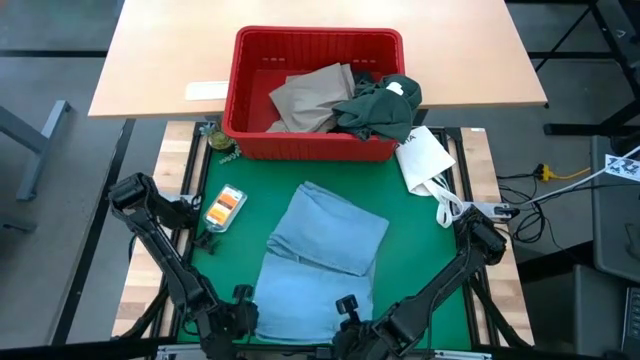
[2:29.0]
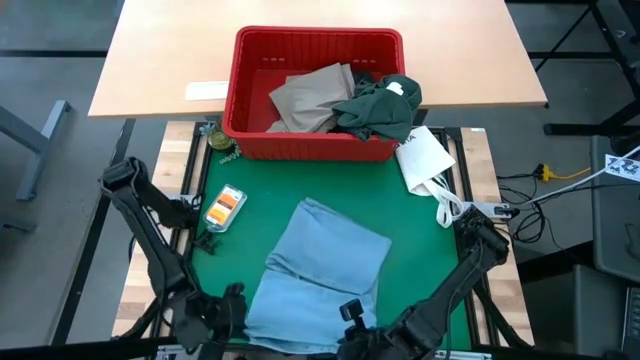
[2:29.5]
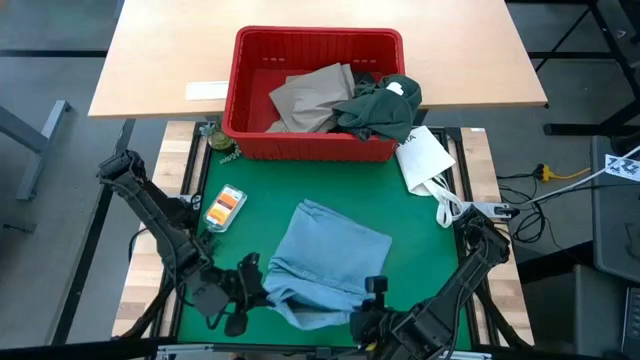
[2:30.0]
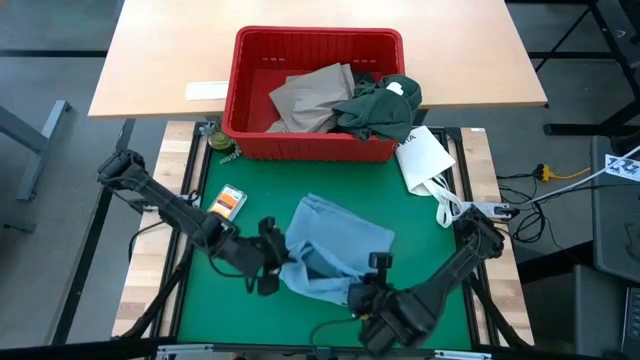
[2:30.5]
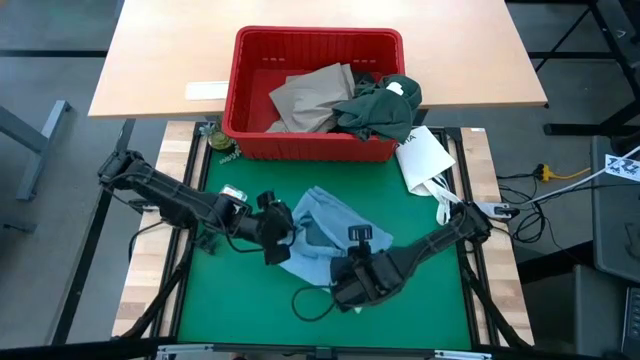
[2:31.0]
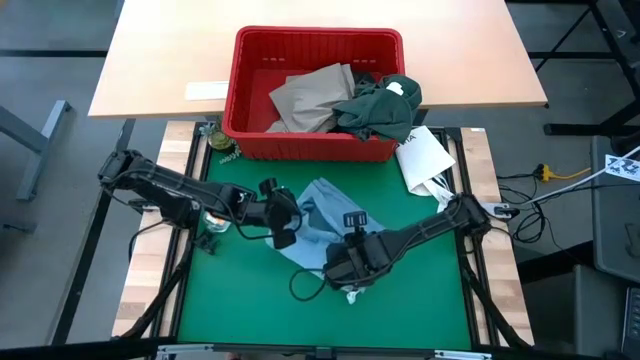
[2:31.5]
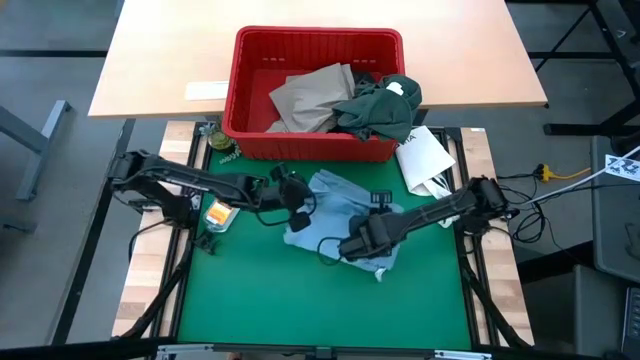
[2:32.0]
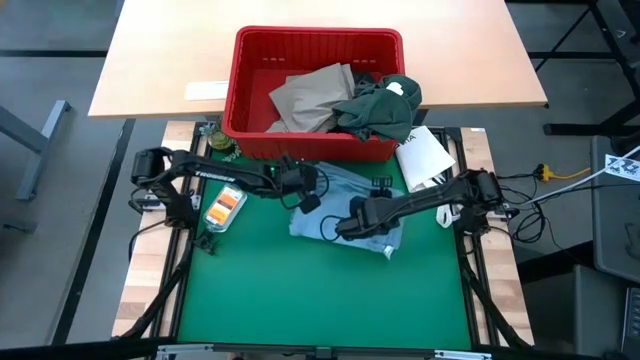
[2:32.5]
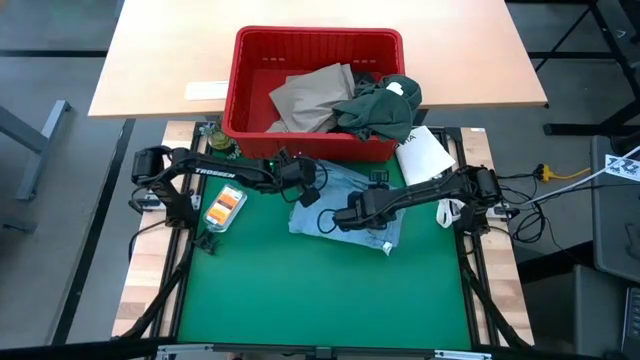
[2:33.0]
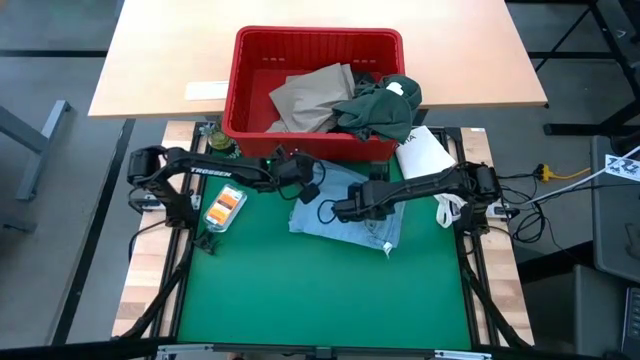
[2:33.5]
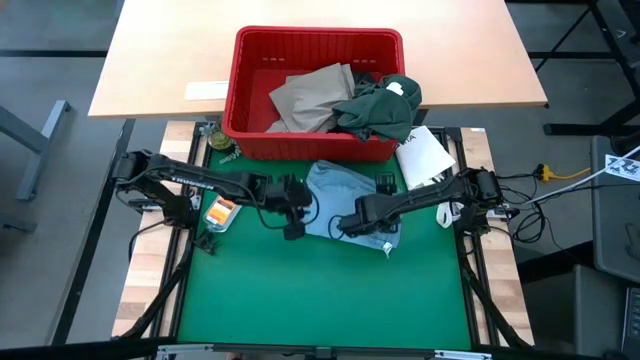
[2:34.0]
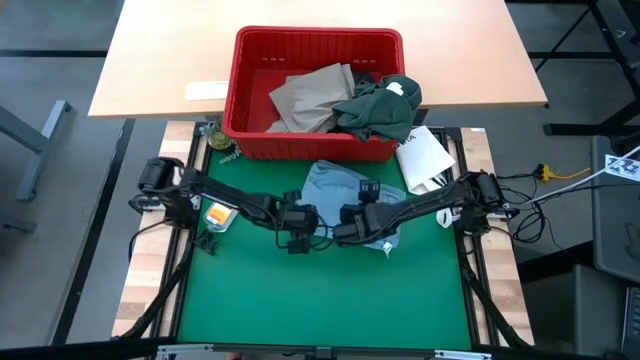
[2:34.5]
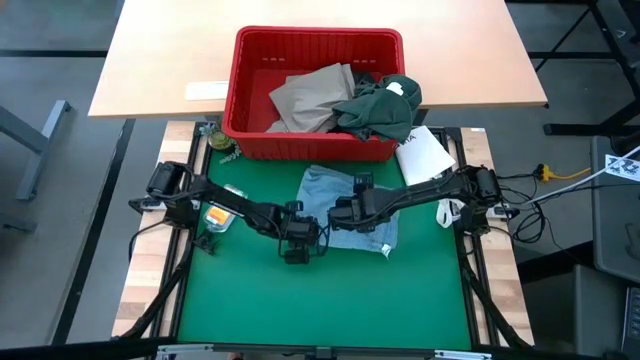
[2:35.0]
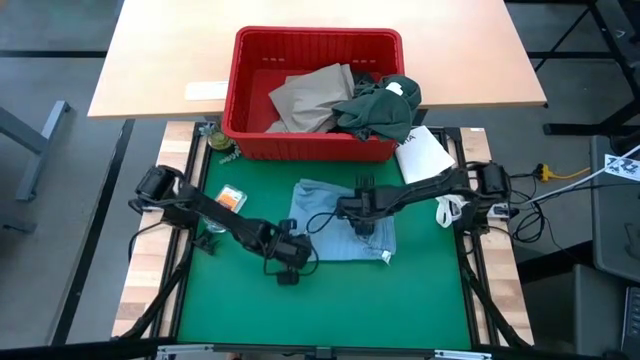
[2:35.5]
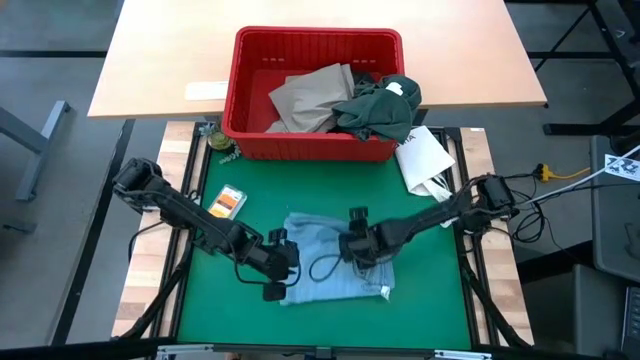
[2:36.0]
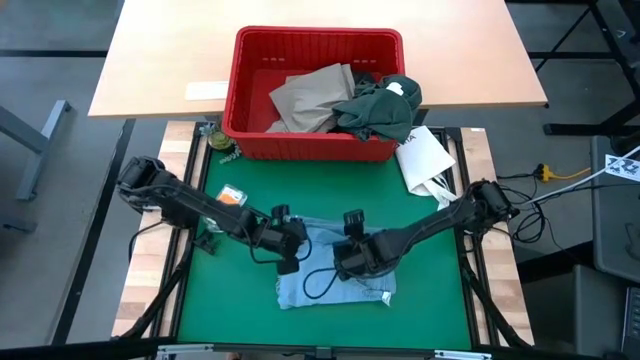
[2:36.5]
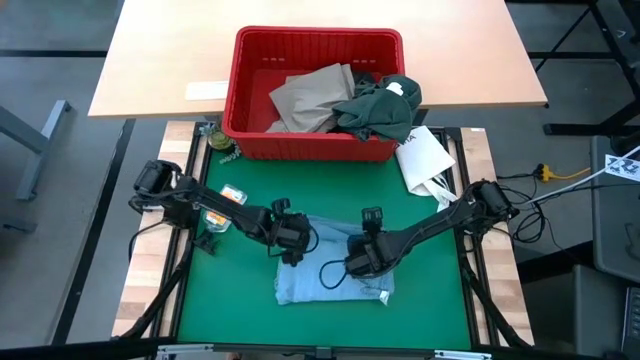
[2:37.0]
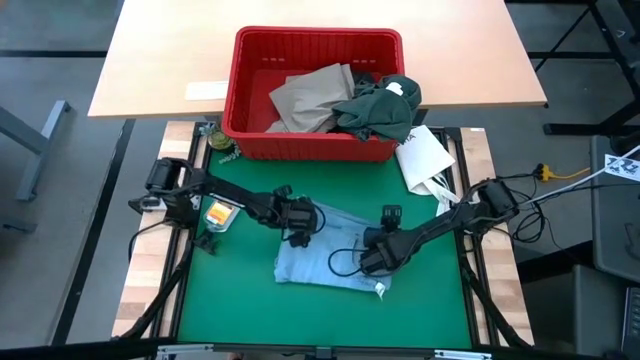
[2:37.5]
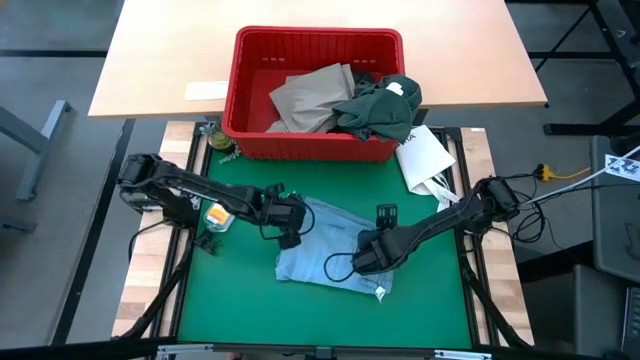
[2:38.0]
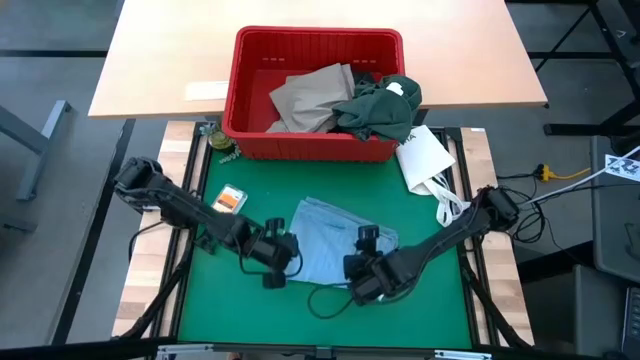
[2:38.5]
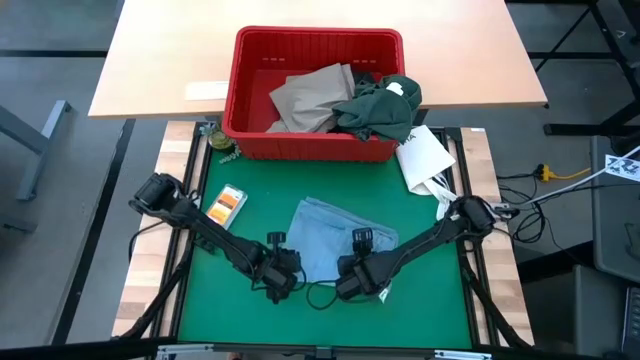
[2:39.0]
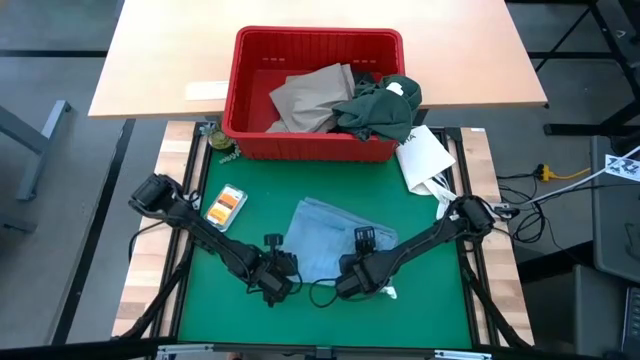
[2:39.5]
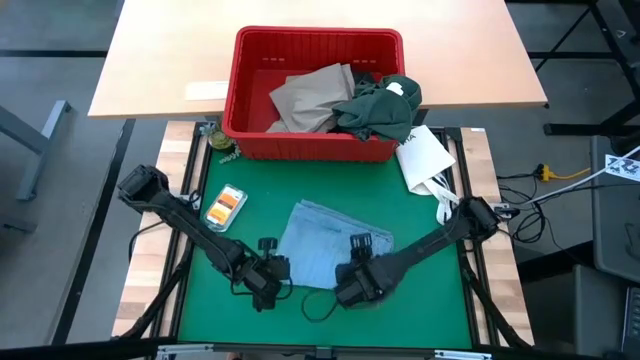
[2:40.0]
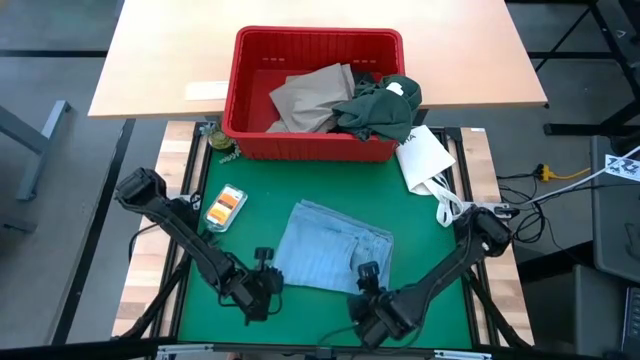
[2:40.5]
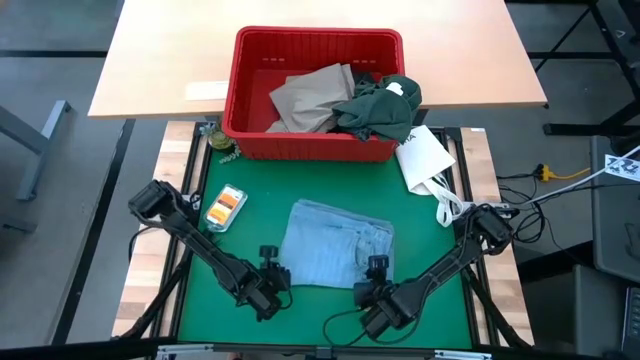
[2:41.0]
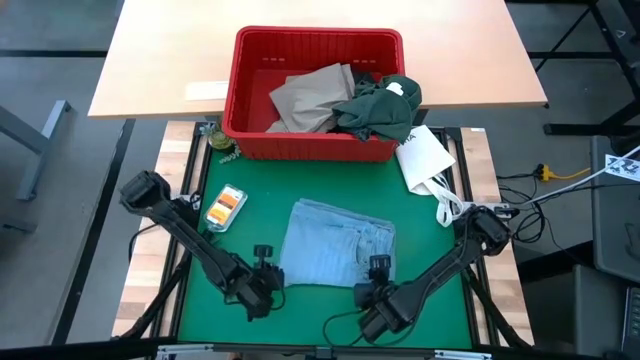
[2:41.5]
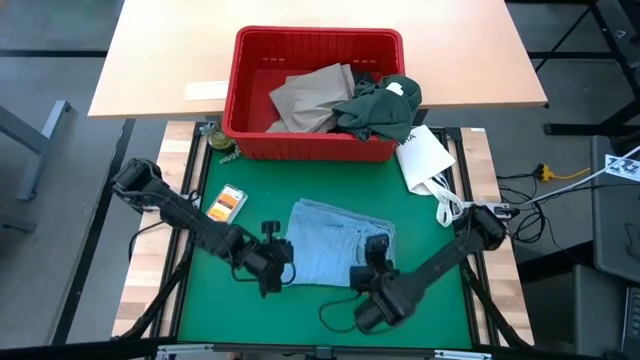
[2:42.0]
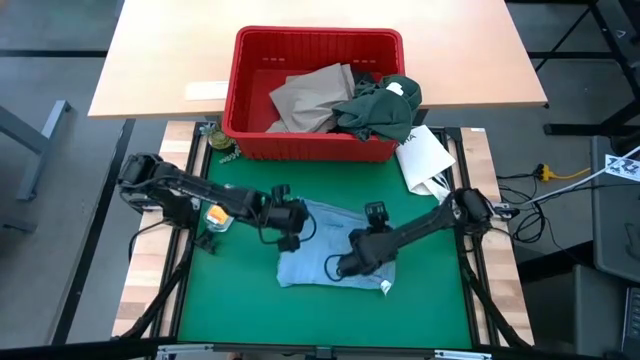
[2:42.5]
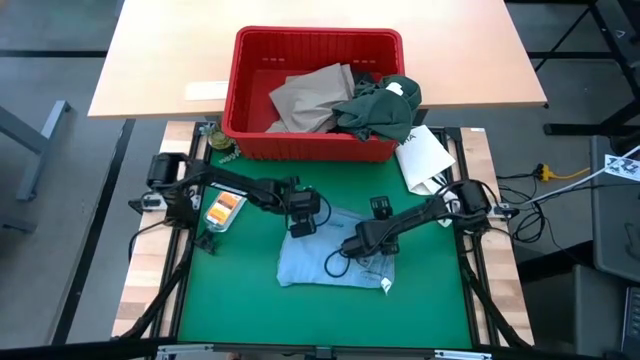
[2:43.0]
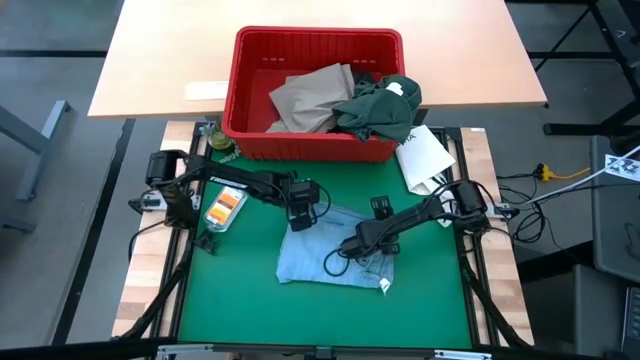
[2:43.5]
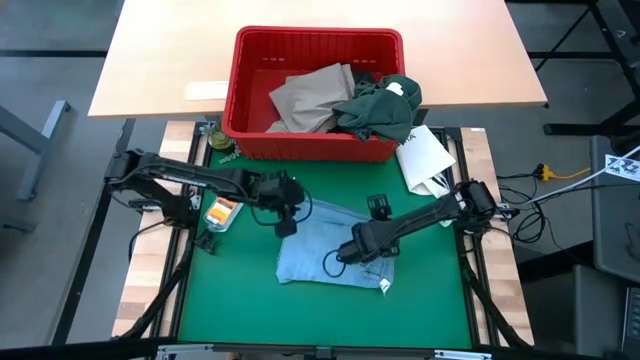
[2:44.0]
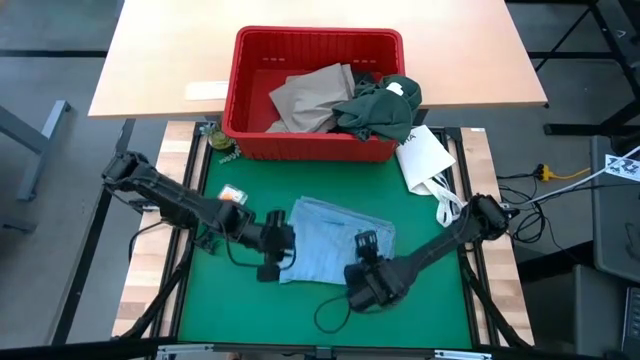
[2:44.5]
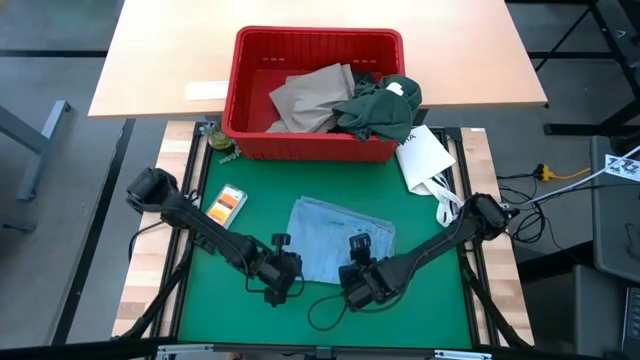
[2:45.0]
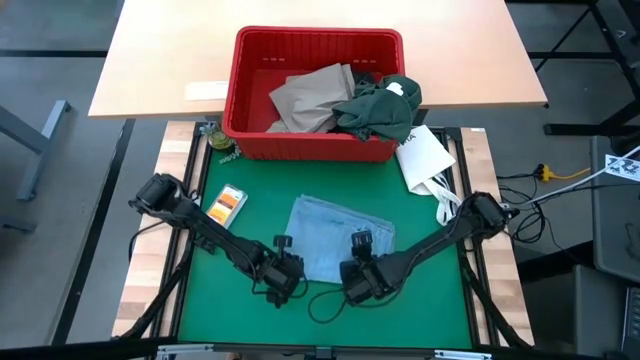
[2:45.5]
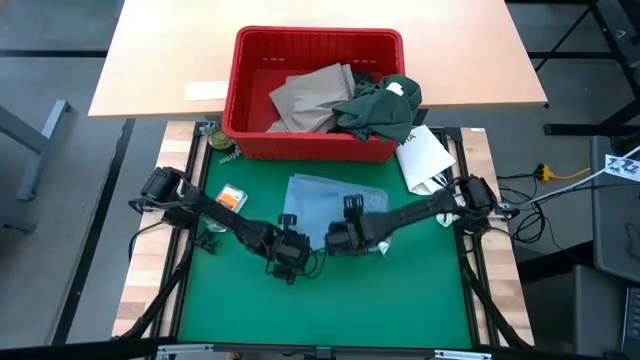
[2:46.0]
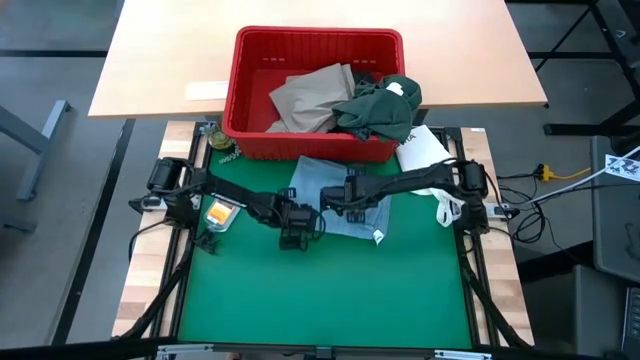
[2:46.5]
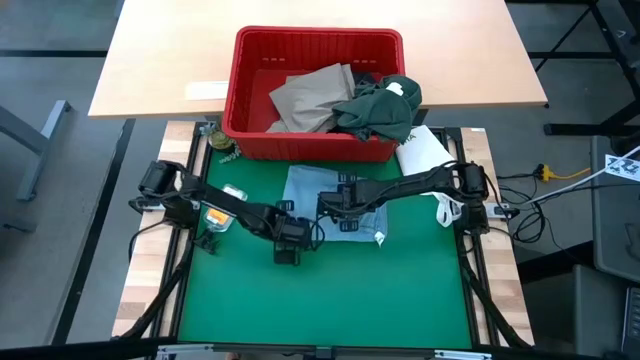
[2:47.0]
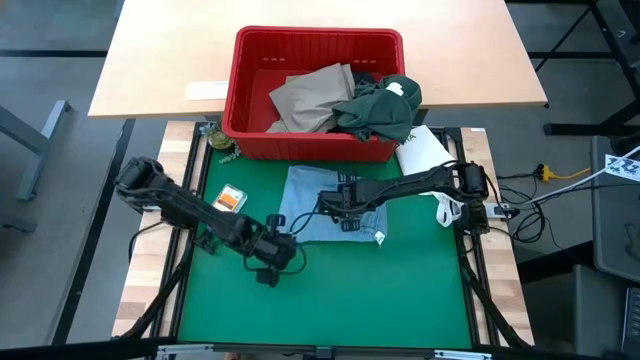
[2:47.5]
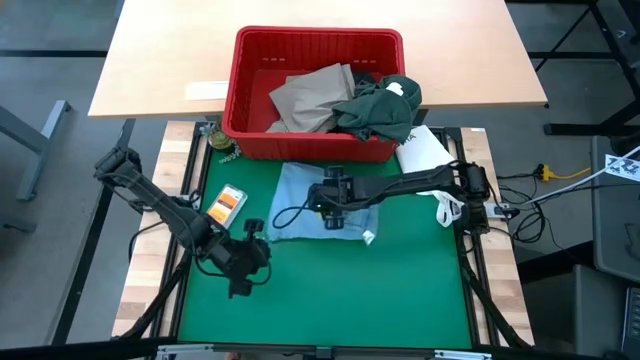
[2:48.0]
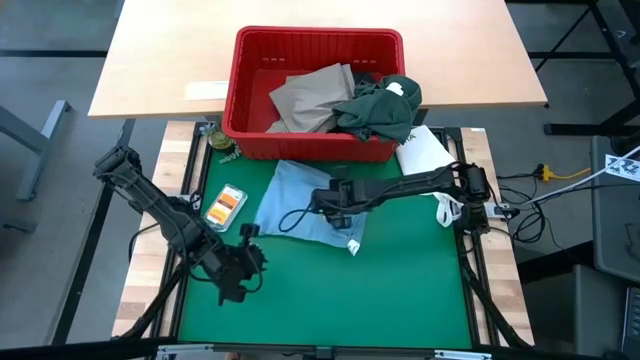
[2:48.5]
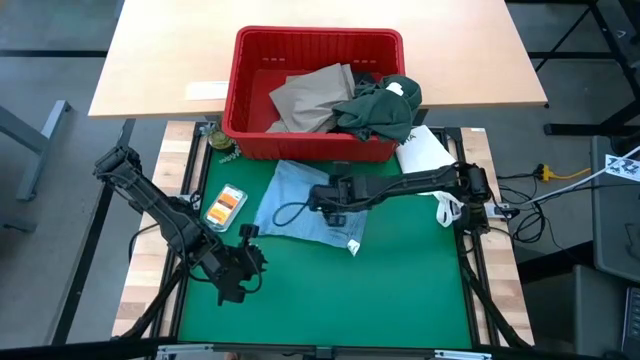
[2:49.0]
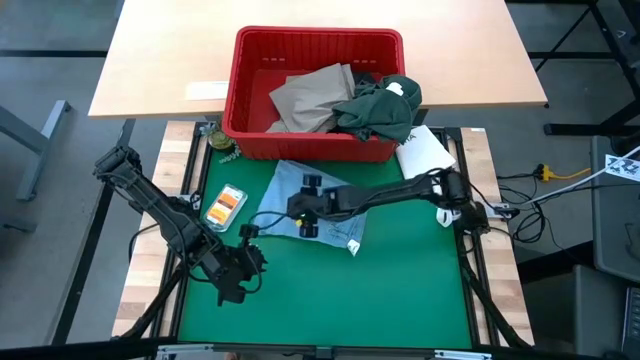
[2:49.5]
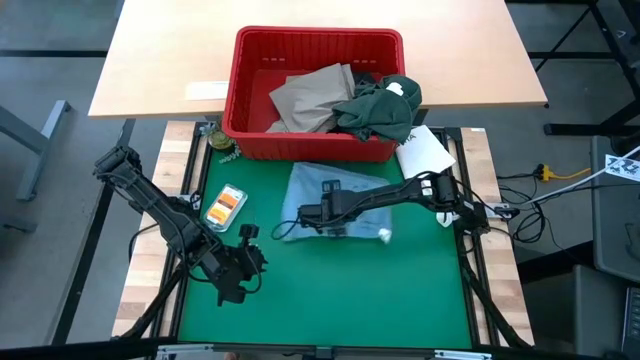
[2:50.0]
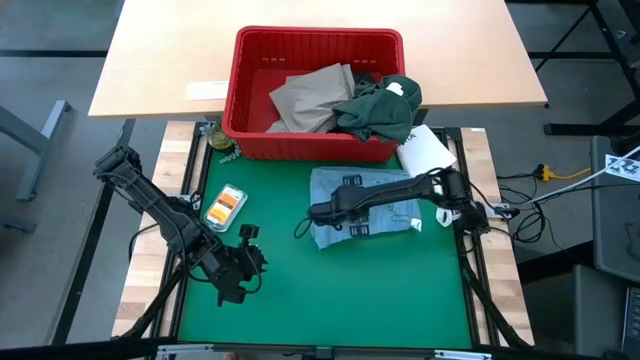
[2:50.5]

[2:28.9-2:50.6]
Task: Fold Laundry from Bin
Fold the blue pants
